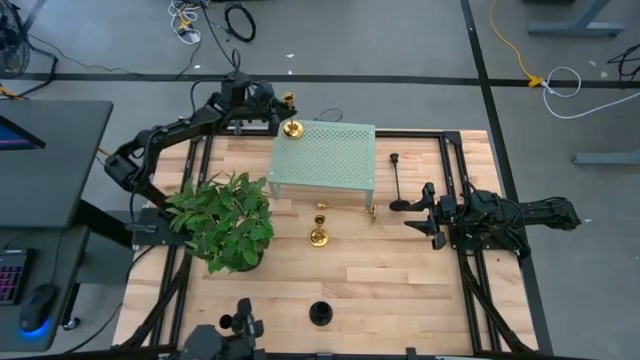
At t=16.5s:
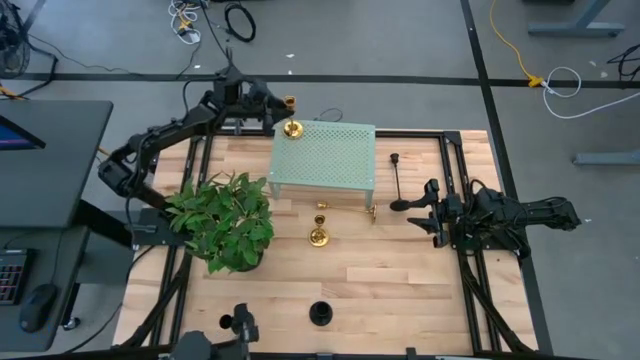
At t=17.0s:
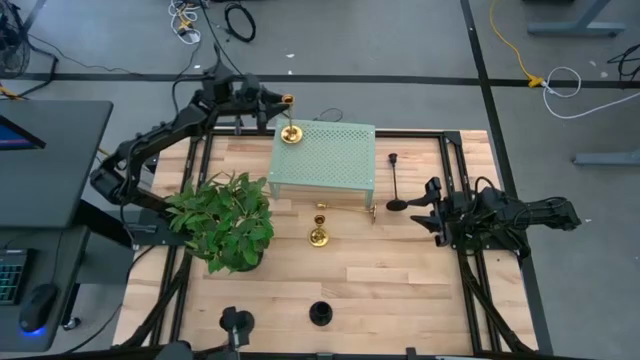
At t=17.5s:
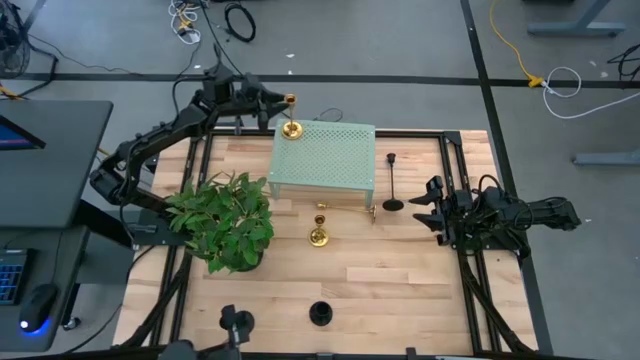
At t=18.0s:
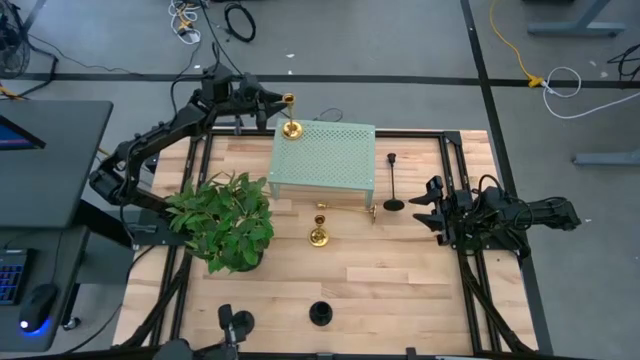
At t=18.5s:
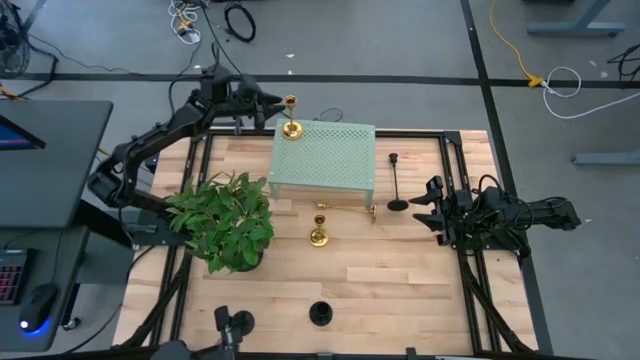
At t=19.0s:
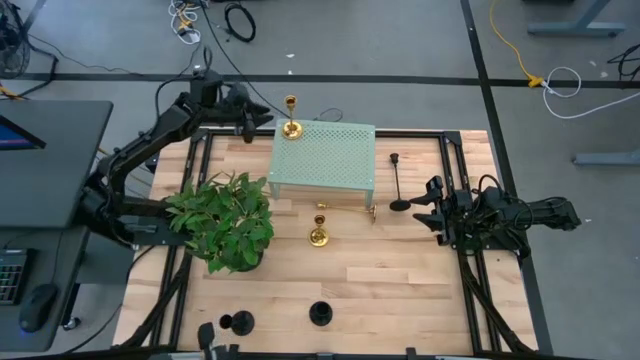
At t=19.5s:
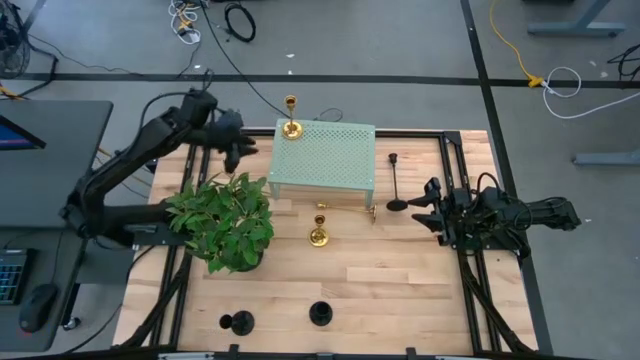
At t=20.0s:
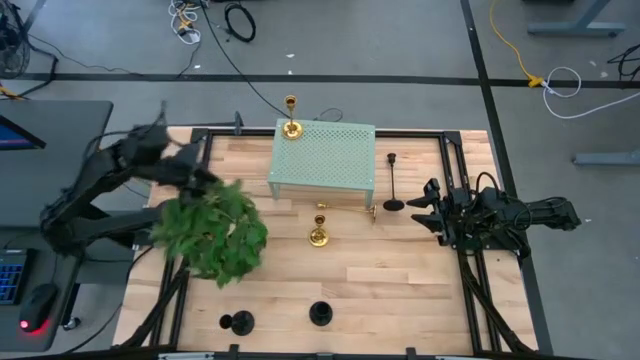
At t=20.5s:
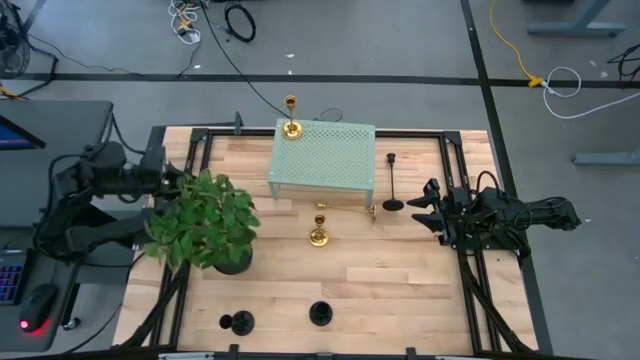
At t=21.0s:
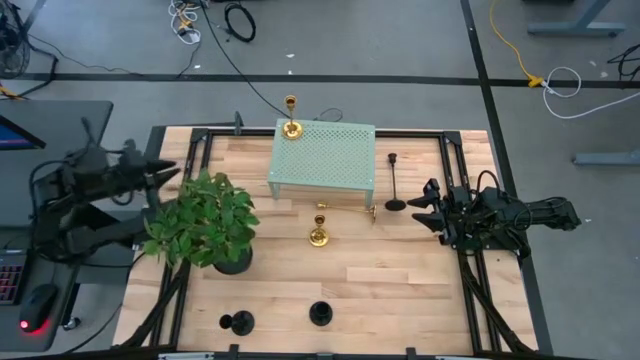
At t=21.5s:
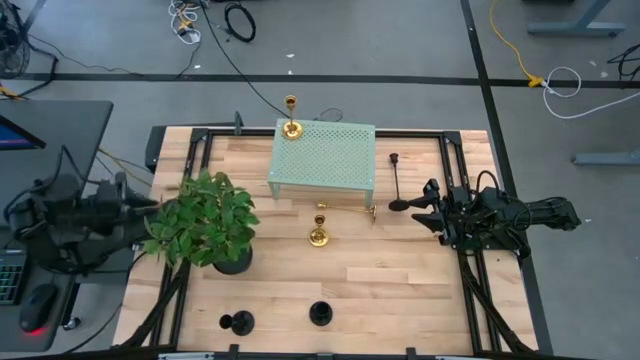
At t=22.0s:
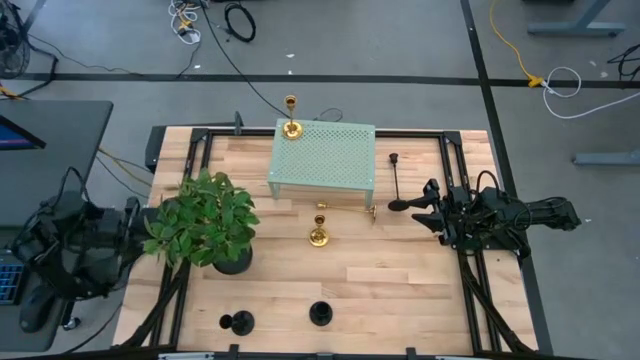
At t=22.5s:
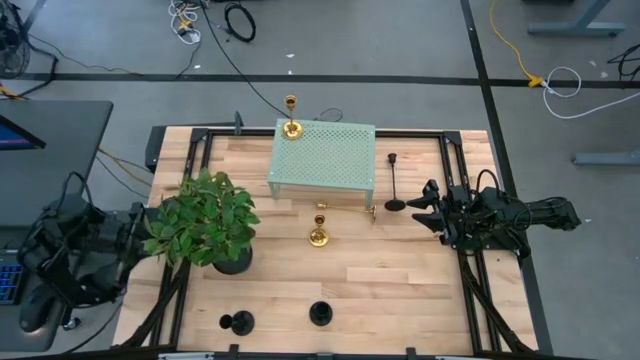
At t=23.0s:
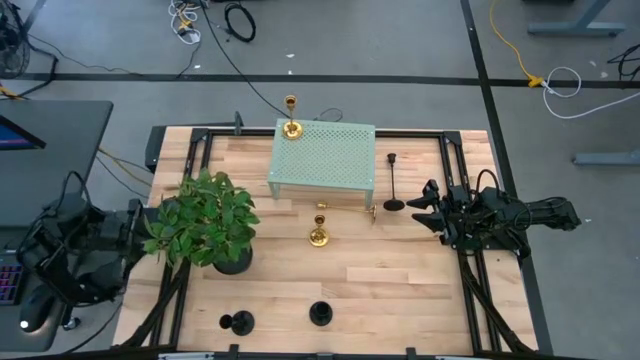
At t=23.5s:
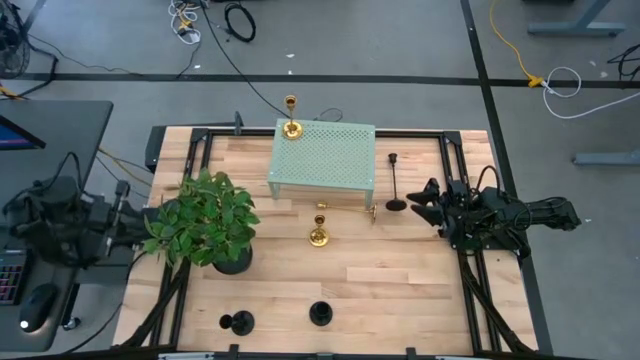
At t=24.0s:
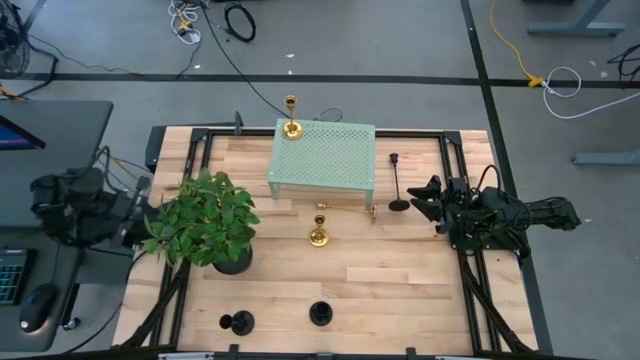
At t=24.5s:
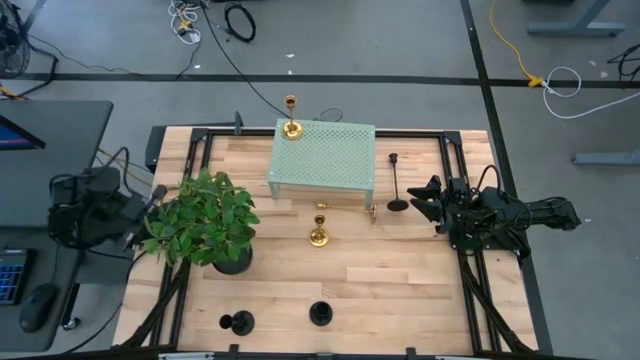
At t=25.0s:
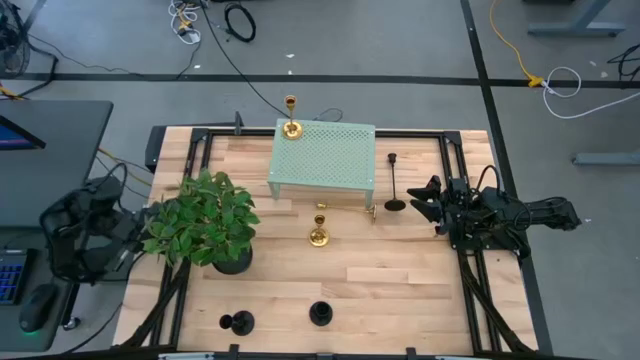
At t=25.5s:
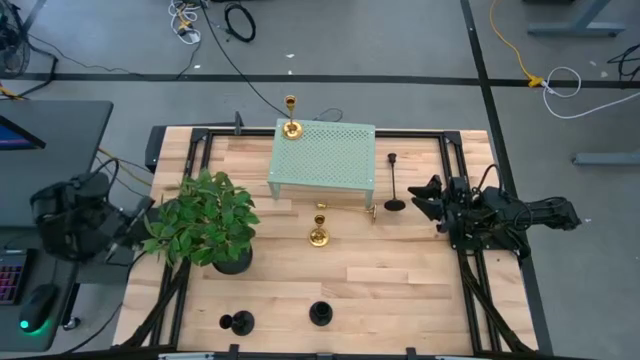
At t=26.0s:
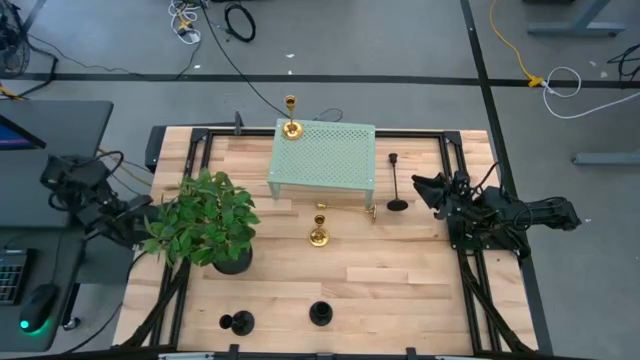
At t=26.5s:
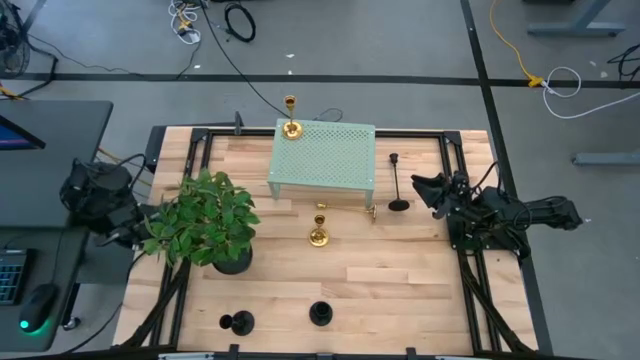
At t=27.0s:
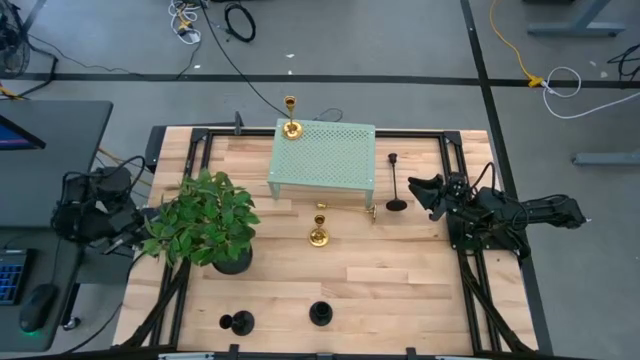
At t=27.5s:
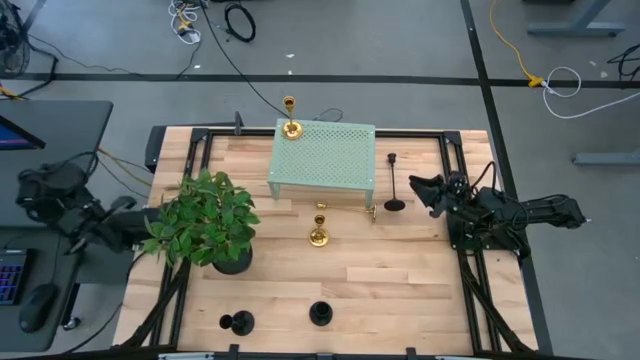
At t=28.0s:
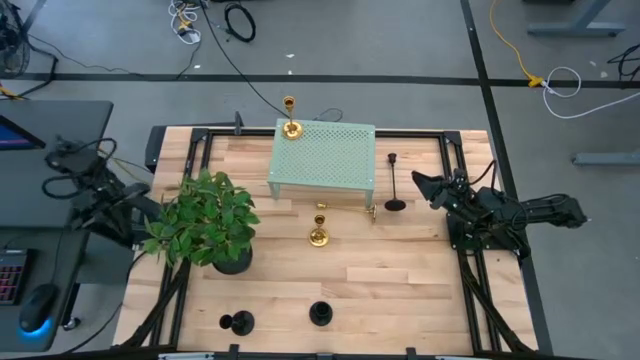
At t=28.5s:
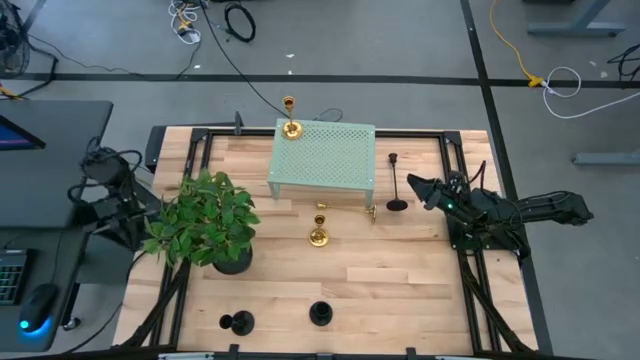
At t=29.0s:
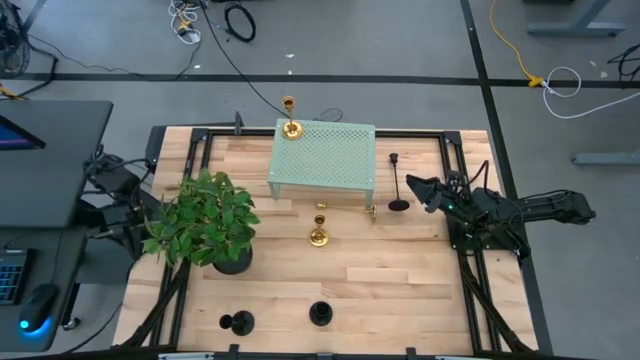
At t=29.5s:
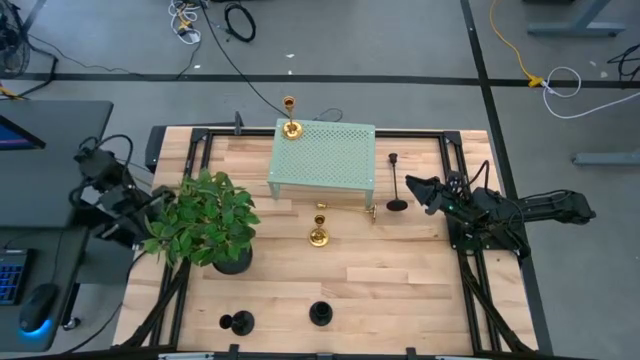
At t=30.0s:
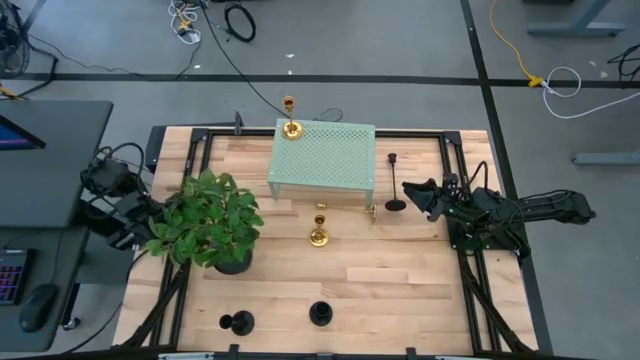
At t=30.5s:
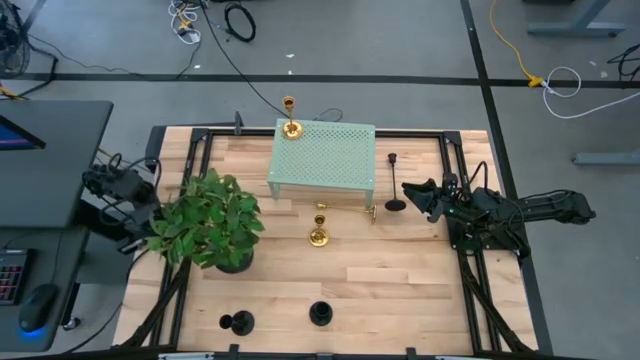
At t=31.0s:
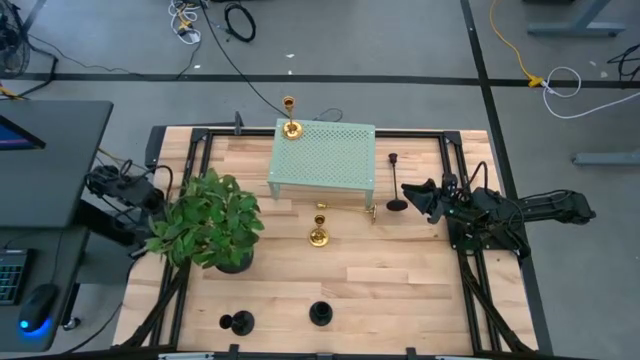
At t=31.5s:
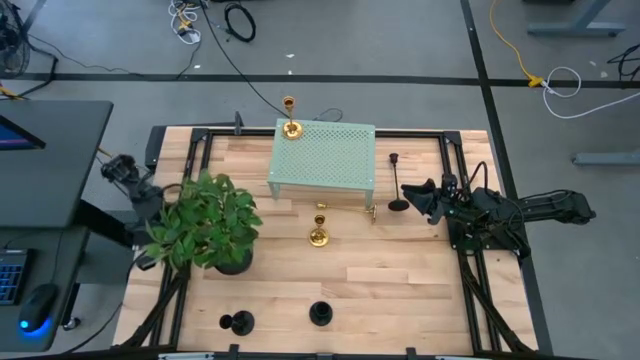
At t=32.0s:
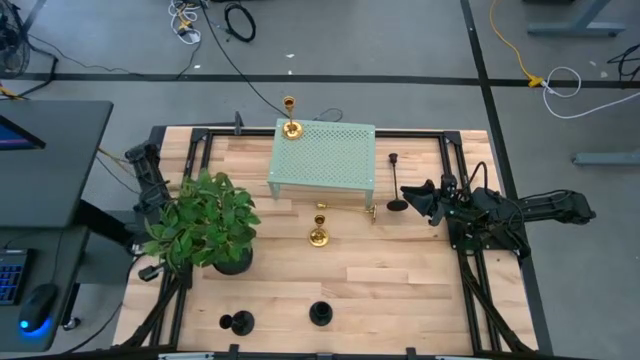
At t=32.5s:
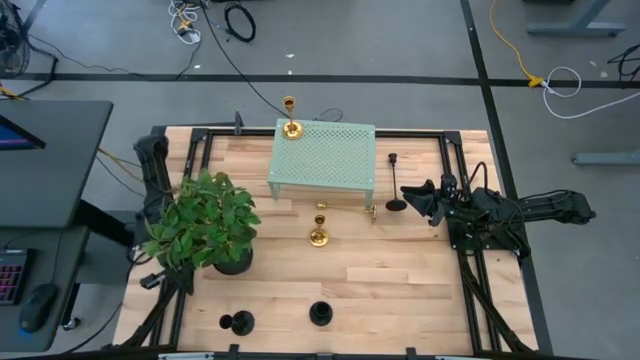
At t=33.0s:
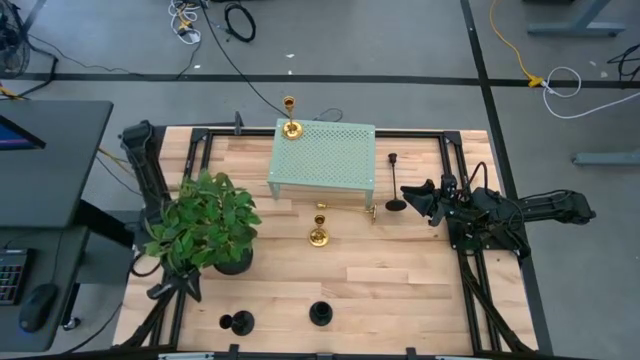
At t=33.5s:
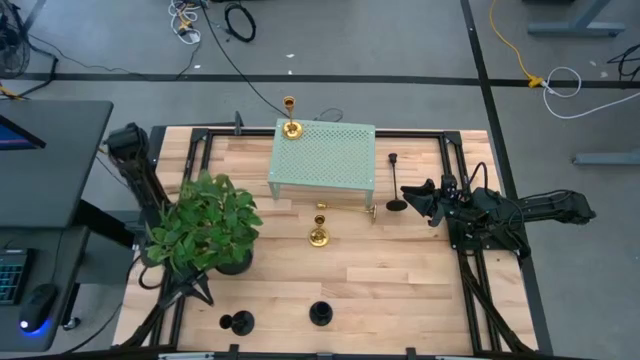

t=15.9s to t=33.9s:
Task: Pick & Place candle stick holders
Put the left black candle holder on the shelf

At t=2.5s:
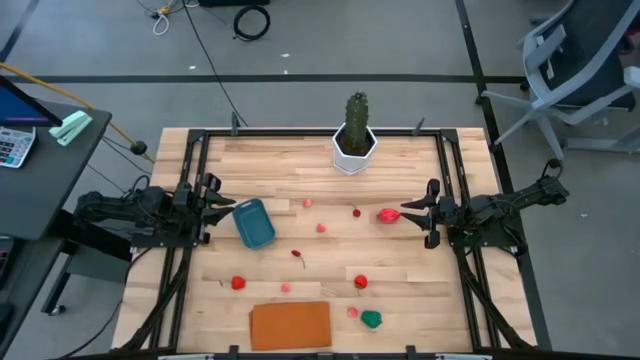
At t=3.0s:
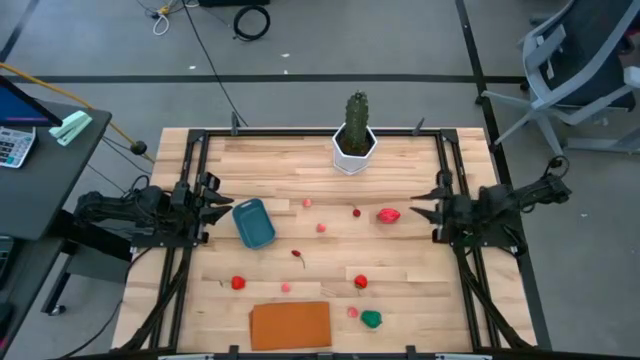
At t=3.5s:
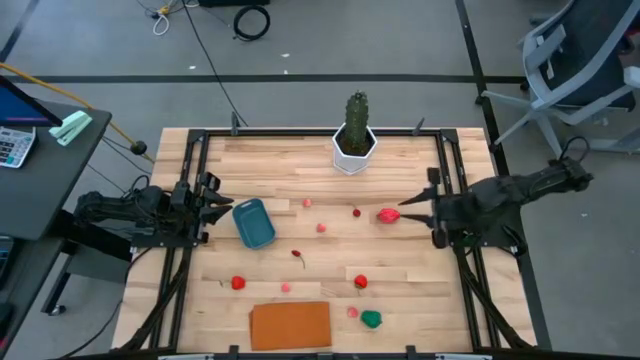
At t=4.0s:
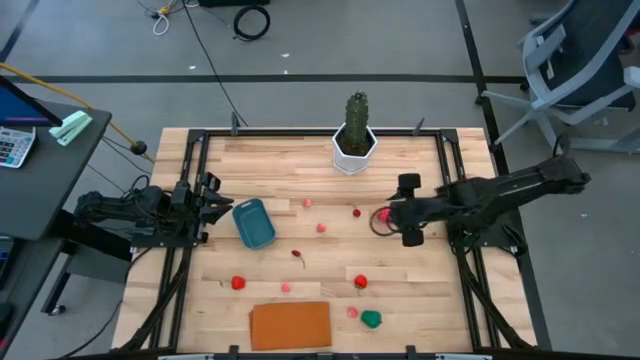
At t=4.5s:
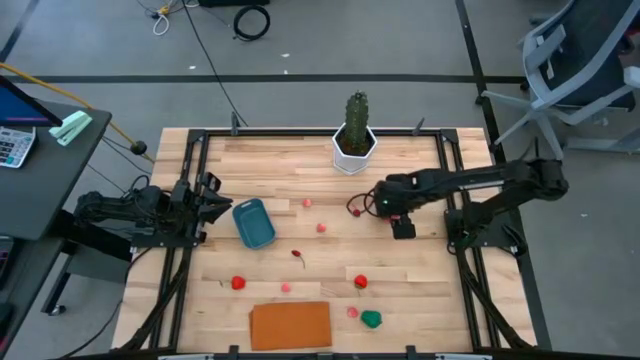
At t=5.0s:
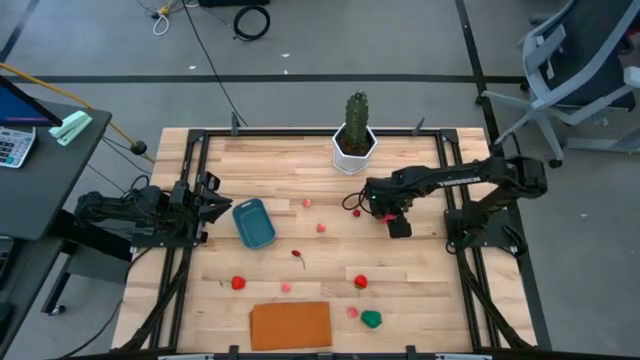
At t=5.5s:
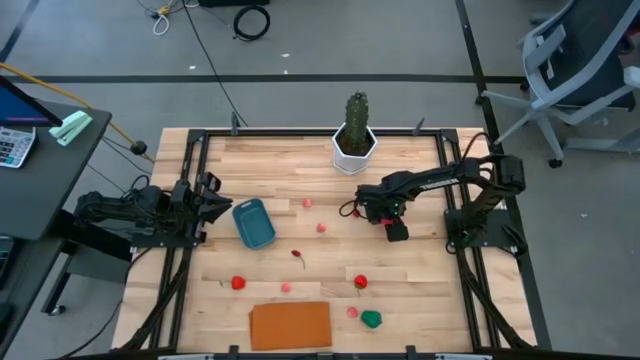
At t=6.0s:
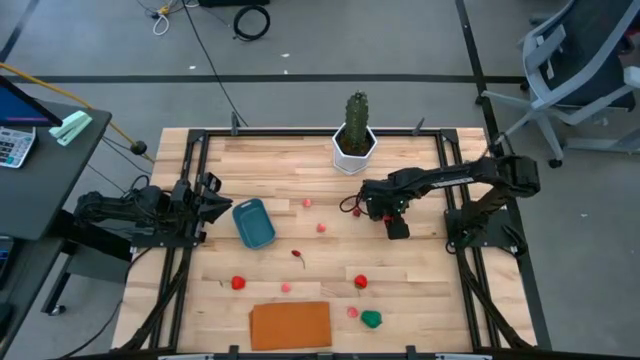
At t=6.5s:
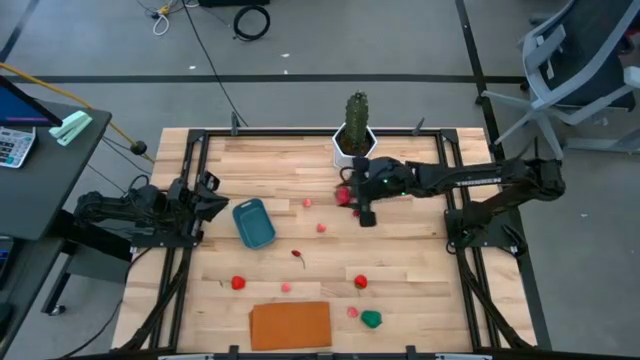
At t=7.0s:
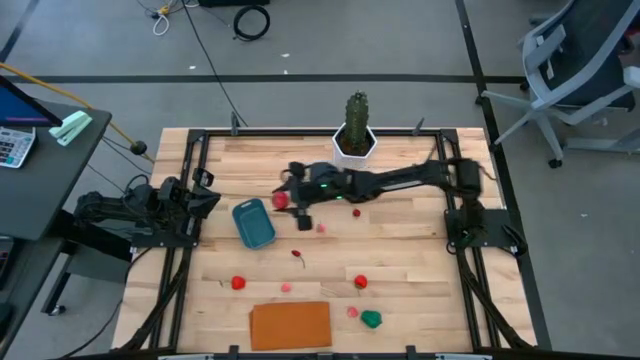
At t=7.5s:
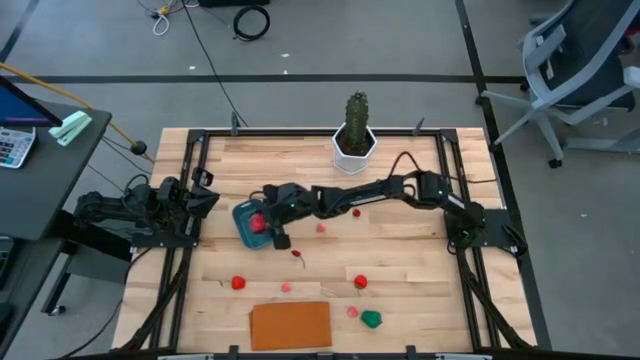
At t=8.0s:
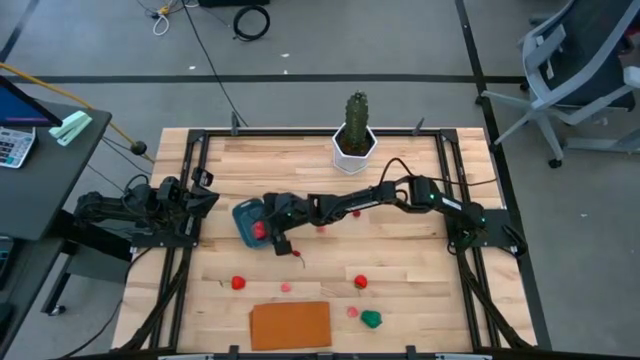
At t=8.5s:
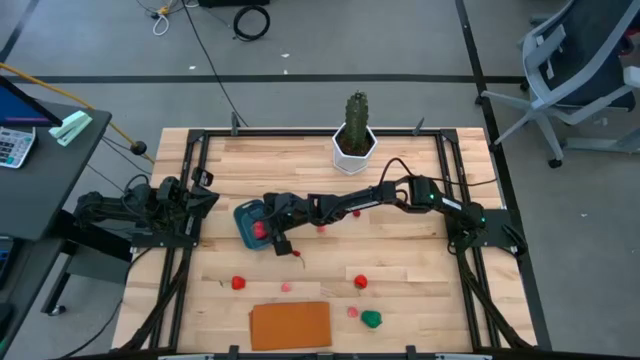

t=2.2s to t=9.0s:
Task: Pick and placing Produce into tupperware
Put the dragon fruit into the blue bin
